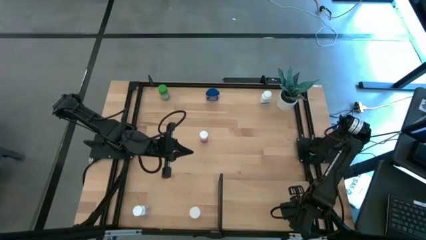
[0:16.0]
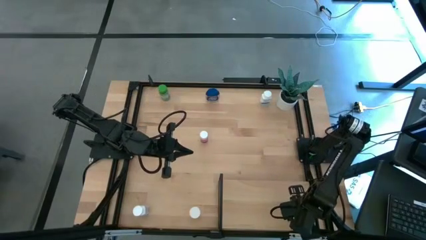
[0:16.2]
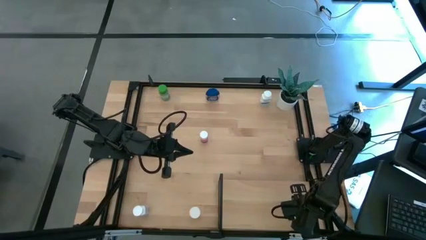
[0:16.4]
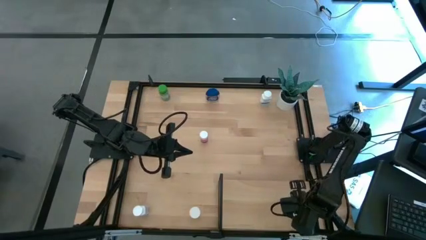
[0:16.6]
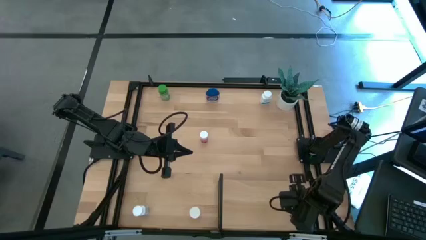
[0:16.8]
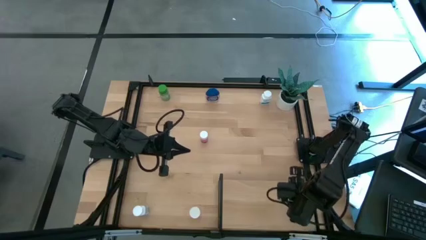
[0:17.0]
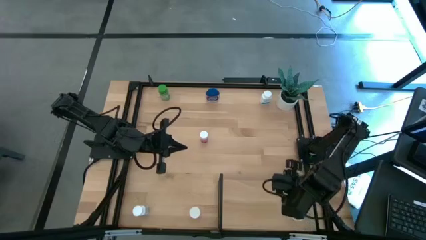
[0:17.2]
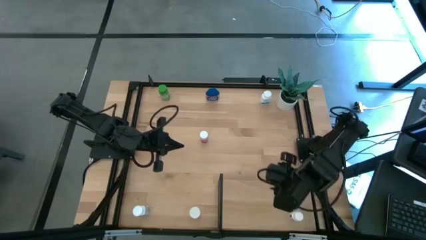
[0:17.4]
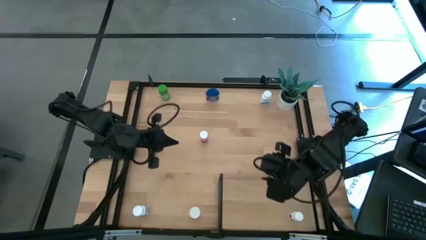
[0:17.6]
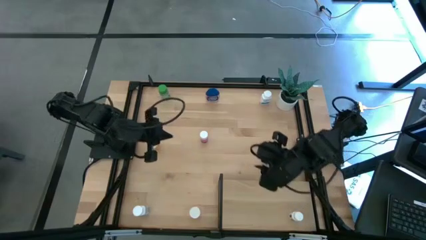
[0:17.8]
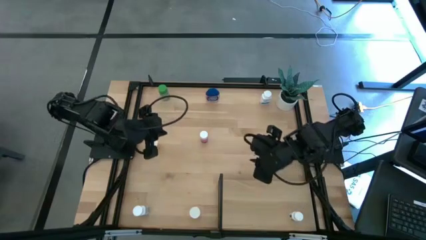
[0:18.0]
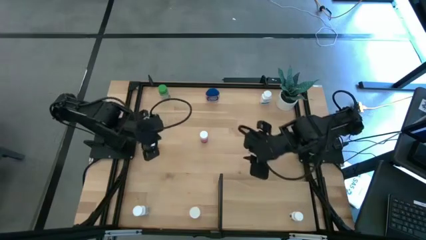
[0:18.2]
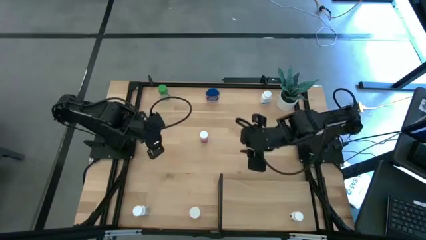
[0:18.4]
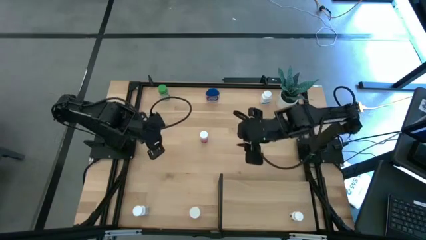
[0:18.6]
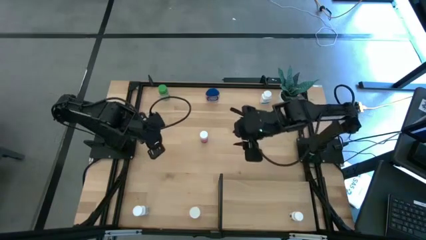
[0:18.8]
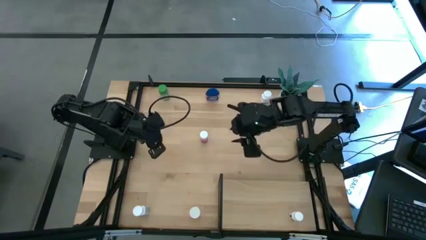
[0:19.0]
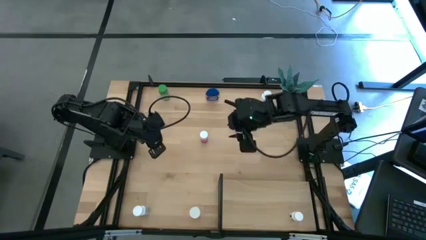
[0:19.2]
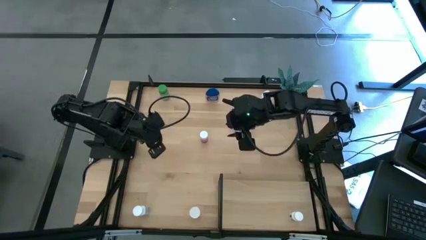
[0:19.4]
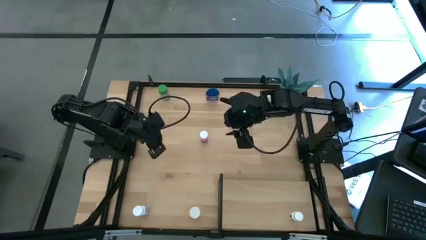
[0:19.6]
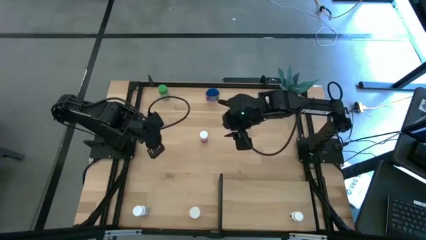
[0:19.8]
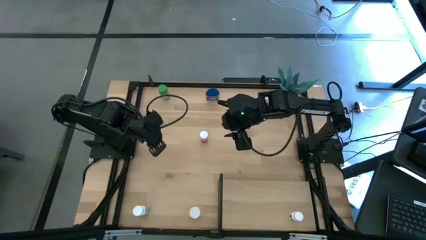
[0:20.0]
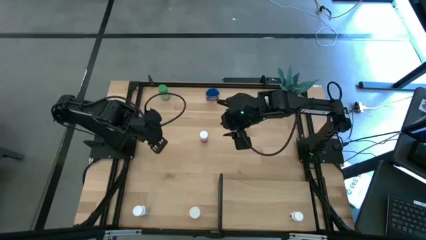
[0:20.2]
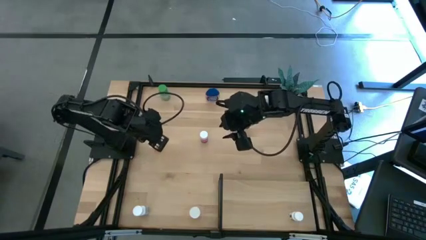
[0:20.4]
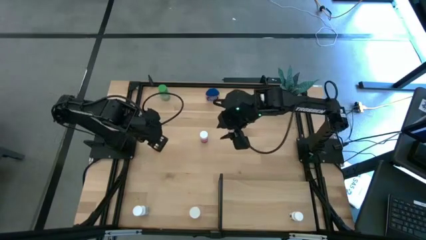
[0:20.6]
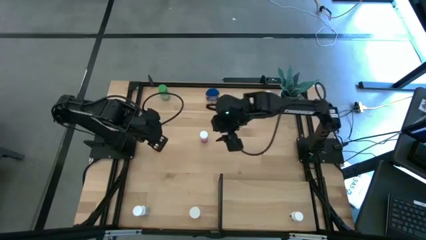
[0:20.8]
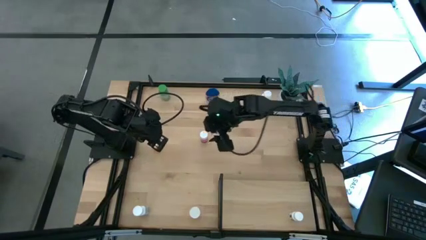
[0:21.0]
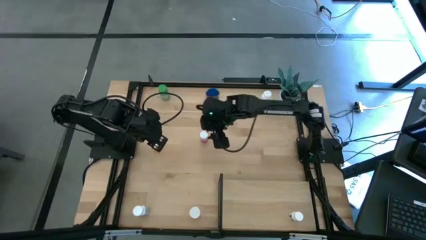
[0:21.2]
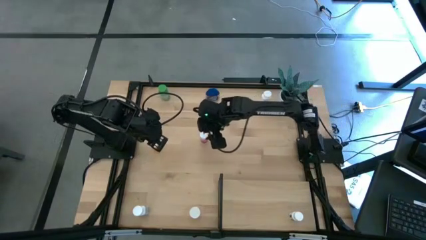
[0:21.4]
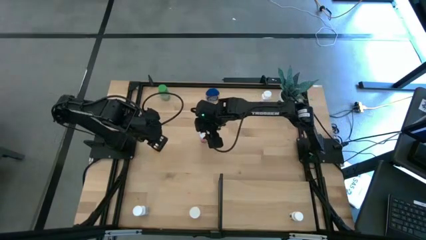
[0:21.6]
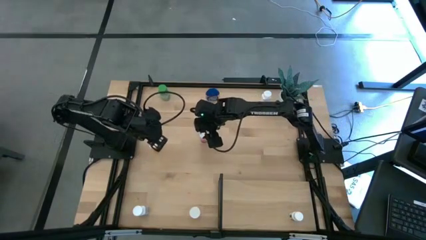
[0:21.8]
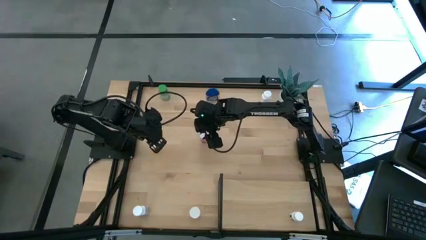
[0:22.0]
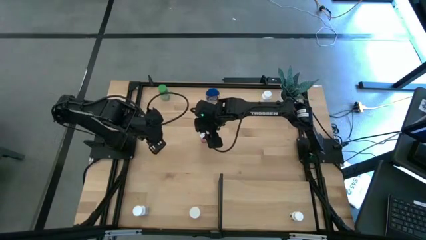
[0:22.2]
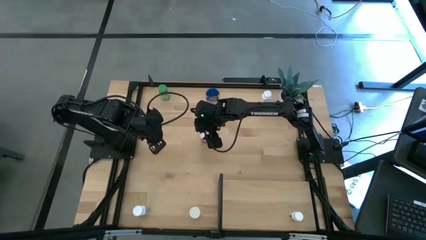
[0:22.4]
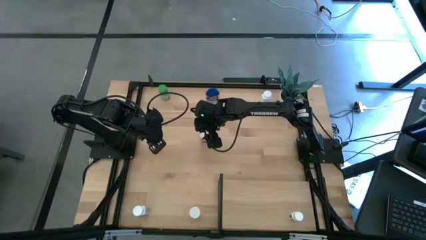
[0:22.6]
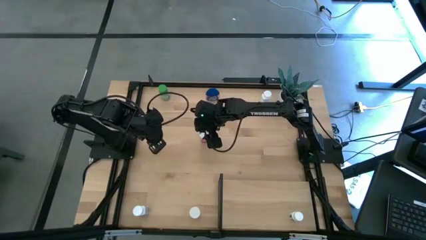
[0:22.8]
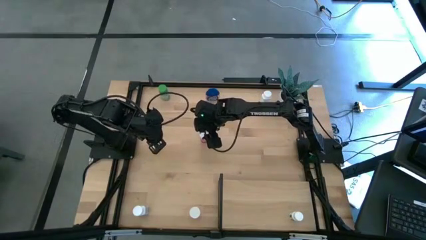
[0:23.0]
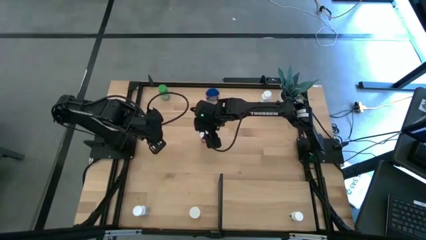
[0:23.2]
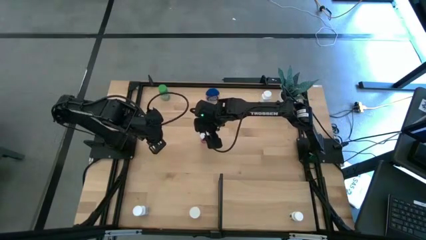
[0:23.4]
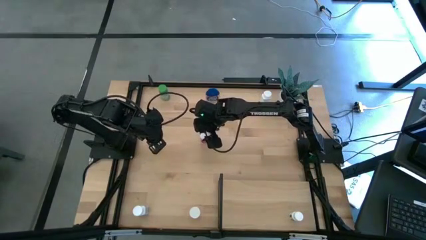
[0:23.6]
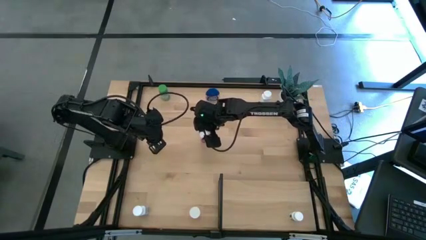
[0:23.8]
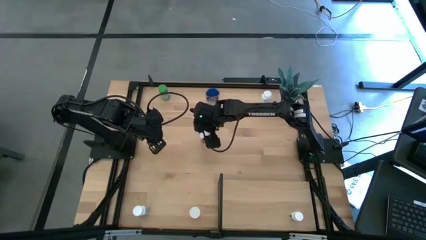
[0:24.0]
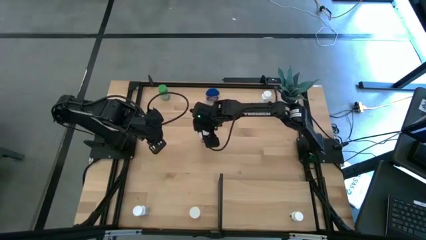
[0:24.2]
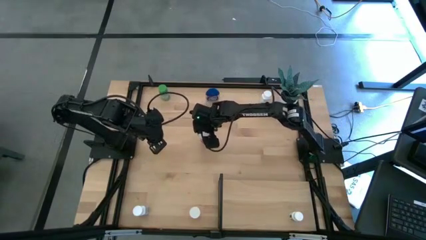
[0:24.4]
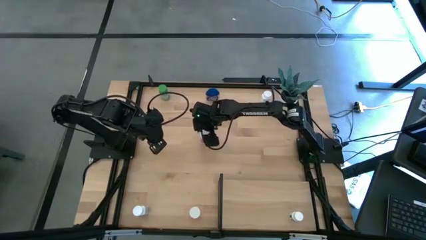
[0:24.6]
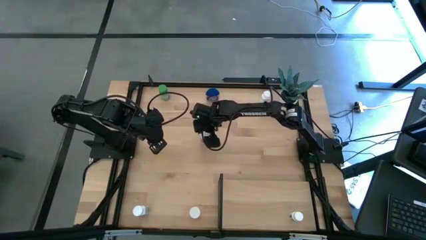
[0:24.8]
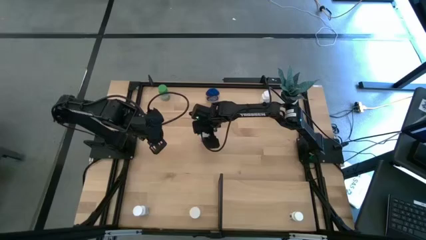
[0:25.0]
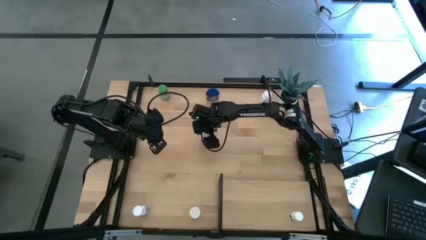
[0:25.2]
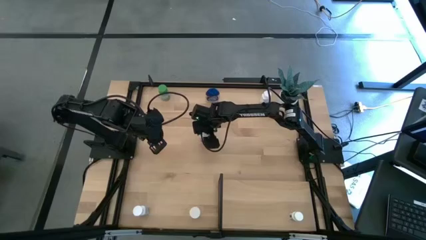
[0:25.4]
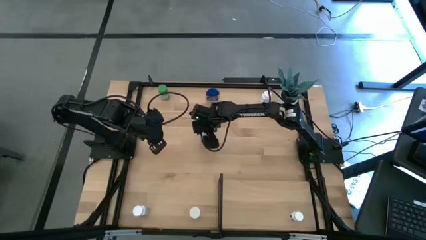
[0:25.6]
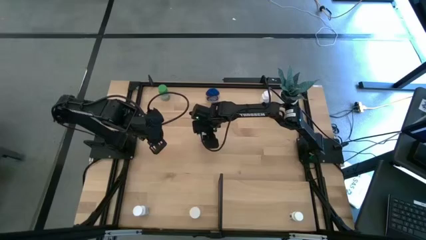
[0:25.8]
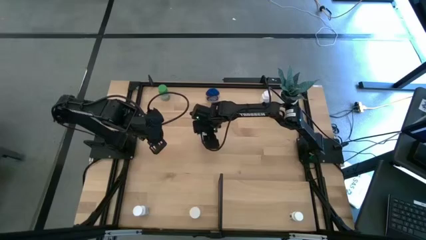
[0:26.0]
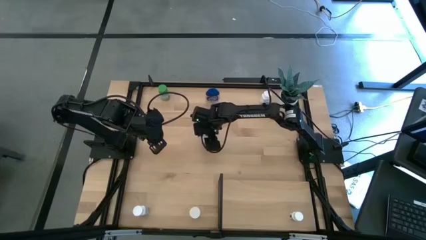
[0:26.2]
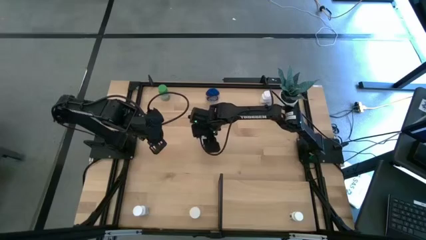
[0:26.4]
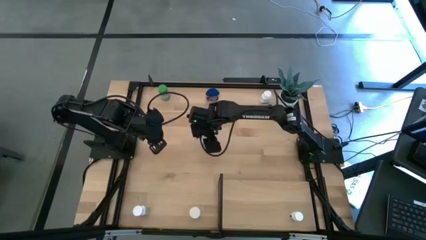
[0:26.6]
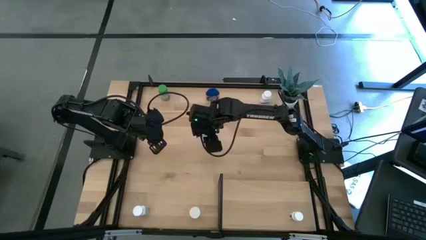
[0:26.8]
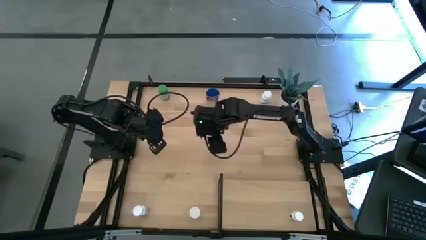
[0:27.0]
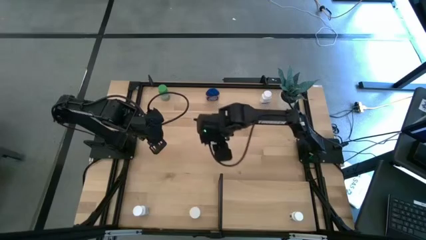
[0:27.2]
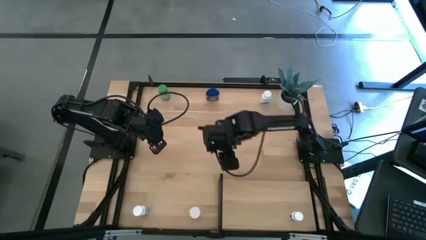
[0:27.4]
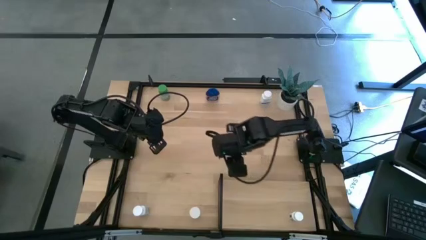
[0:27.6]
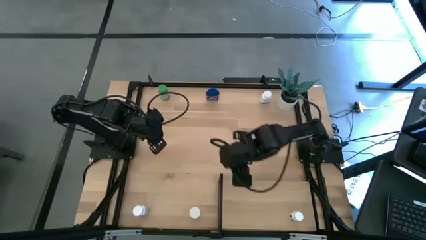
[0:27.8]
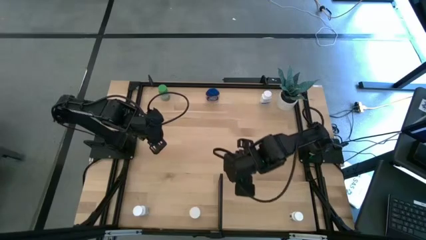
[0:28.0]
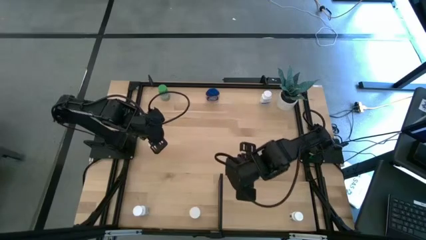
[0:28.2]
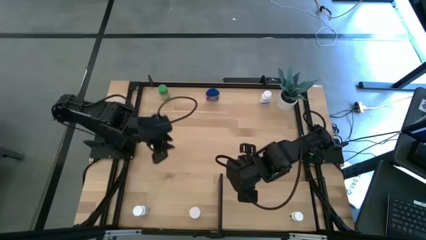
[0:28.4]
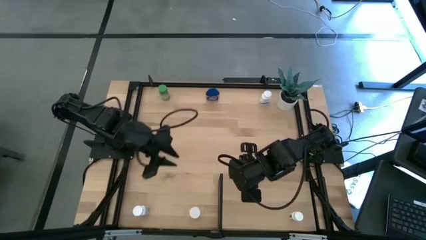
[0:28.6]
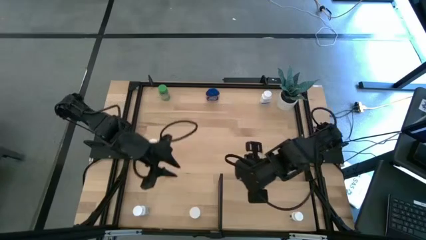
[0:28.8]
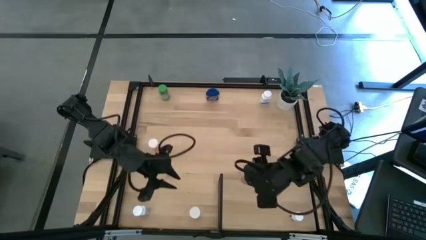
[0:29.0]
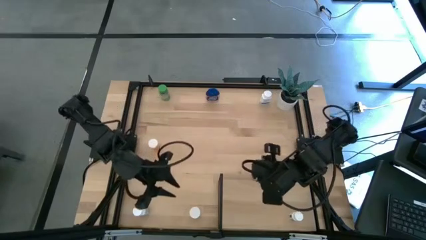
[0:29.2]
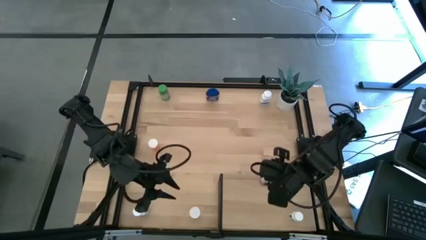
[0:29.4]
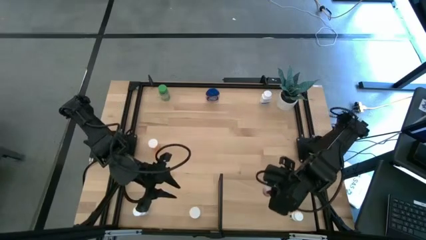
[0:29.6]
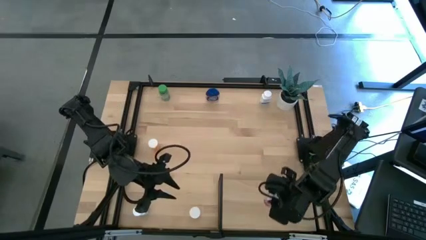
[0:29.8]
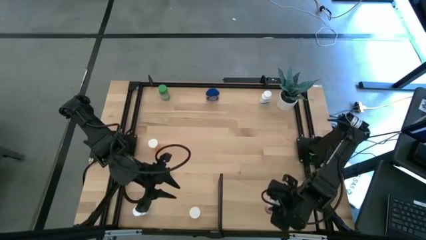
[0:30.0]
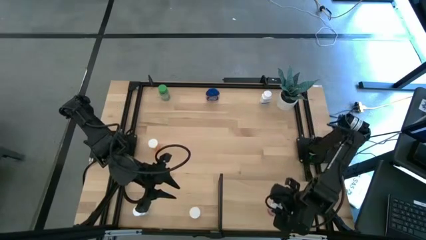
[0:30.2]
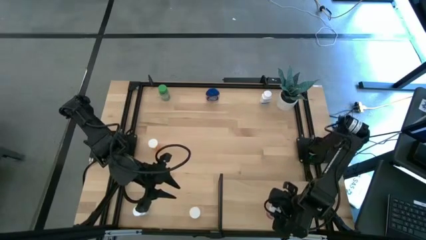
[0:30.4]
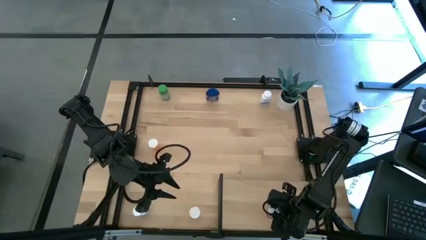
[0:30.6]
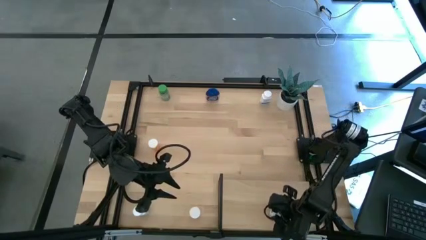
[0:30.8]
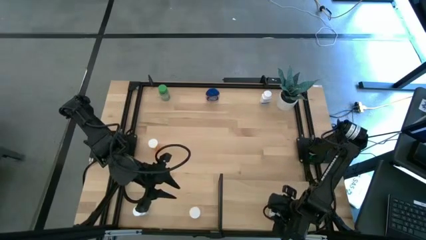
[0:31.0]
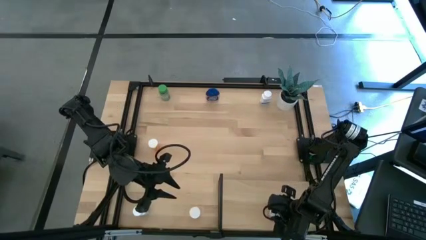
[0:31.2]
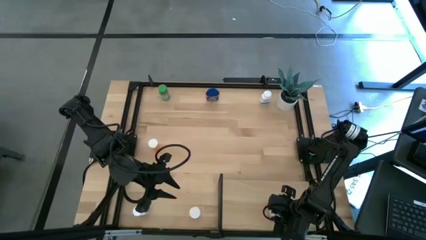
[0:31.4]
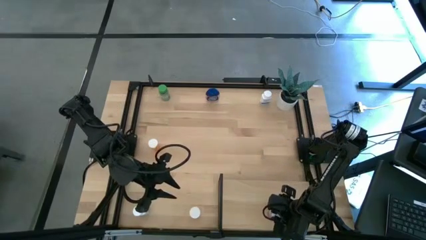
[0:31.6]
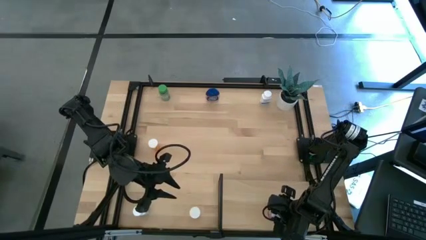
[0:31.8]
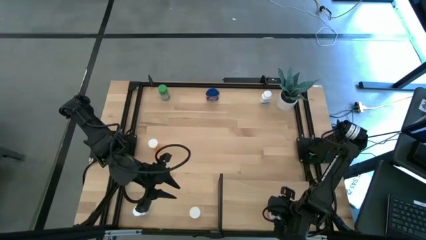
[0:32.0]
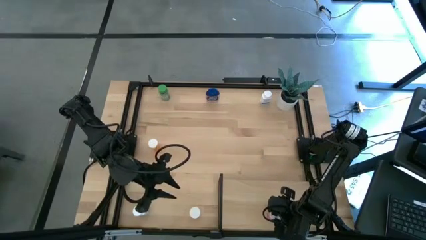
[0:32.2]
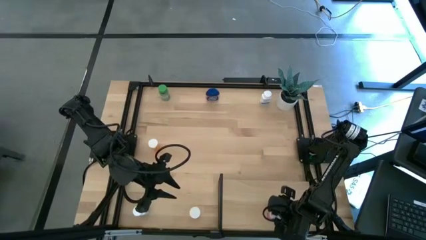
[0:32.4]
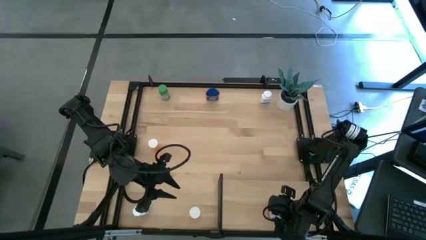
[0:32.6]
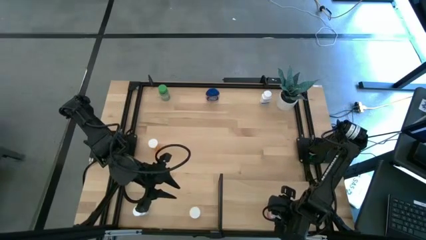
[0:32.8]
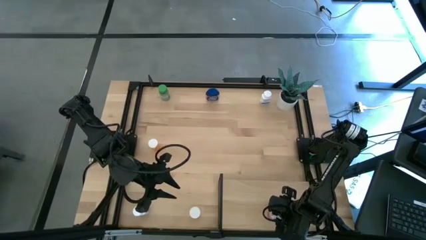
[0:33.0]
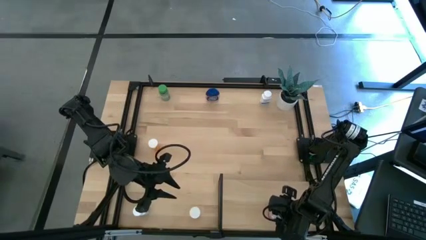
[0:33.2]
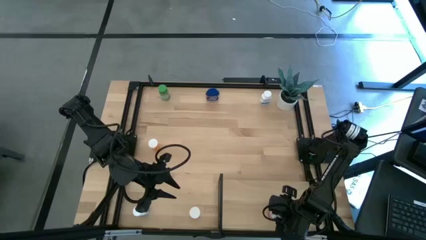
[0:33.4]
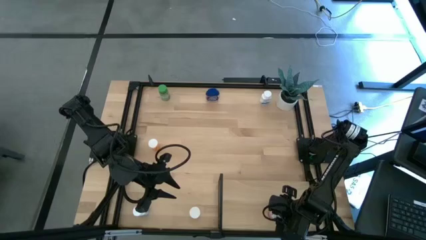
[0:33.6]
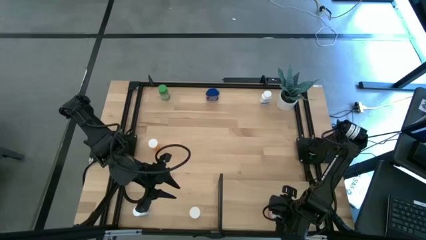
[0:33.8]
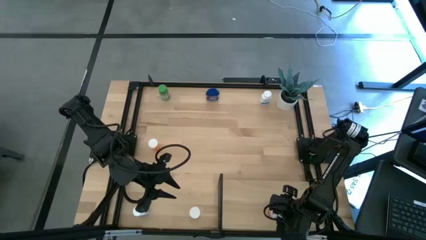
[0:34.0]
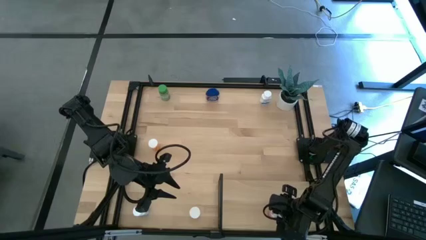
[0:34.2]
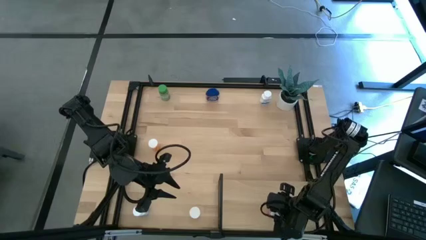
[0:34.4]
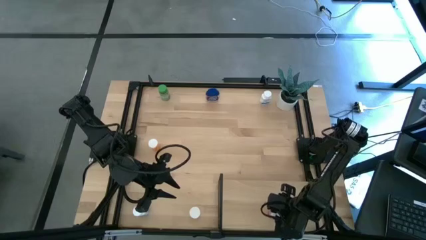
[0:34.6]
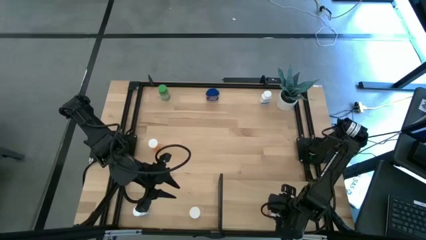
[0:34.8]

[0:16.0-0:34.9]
Task: Pick and place medicine bottles onto shelf by color
Put the pink pill bottle onto the shelf
